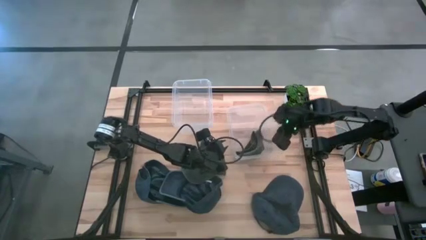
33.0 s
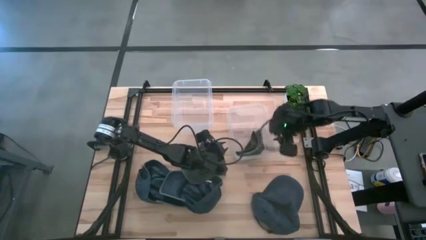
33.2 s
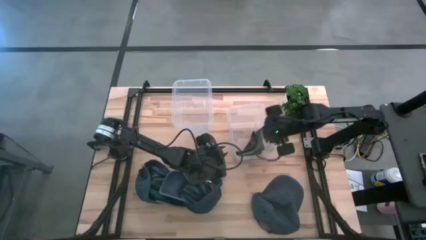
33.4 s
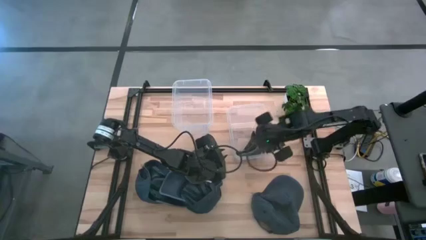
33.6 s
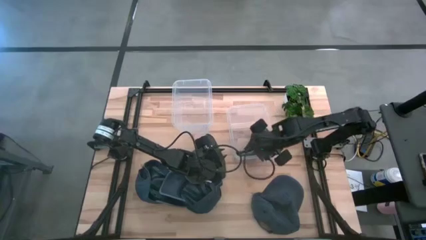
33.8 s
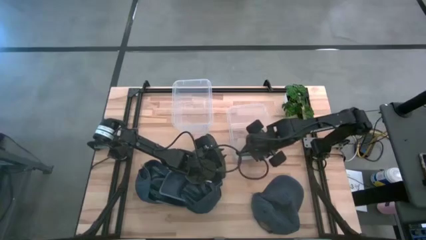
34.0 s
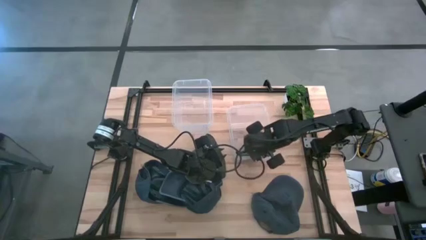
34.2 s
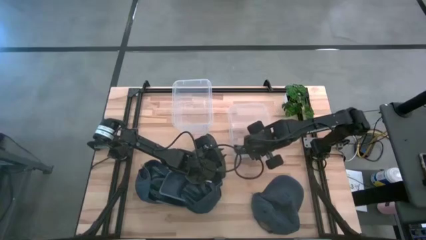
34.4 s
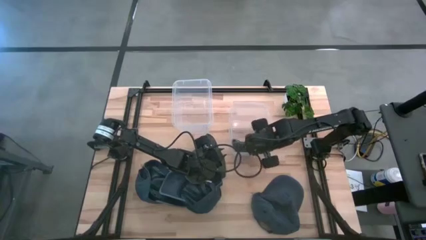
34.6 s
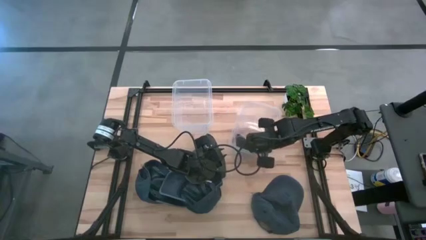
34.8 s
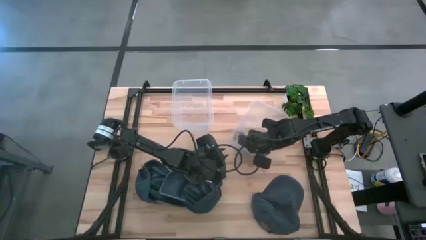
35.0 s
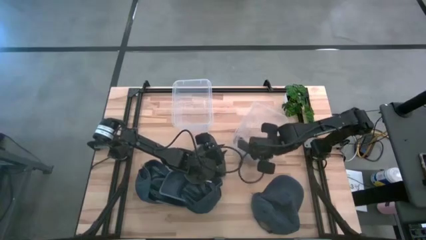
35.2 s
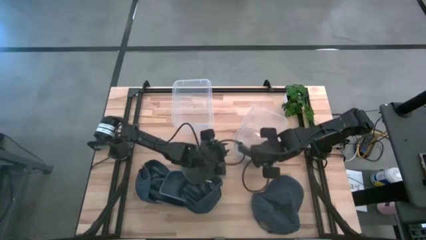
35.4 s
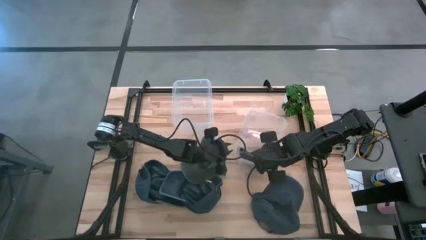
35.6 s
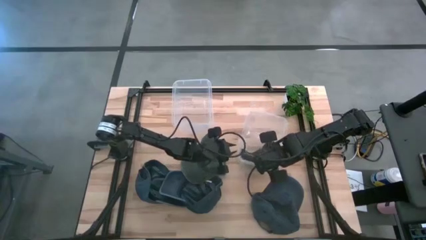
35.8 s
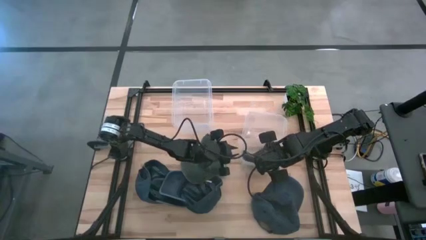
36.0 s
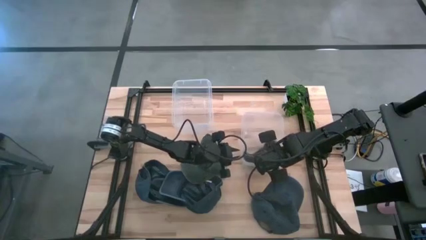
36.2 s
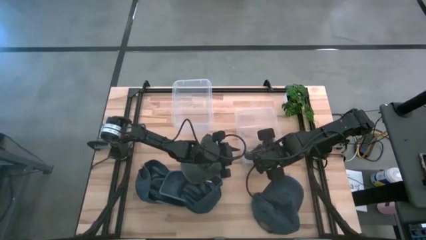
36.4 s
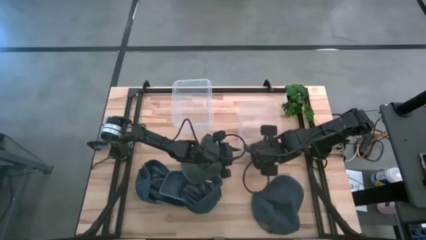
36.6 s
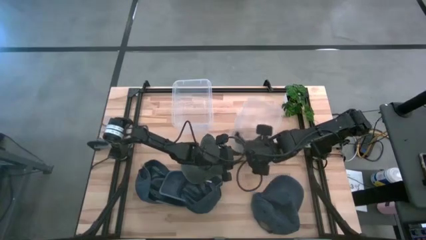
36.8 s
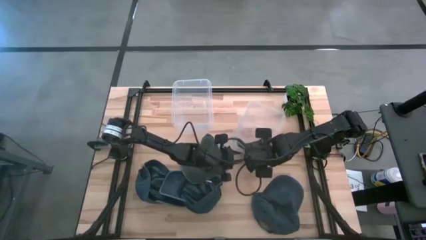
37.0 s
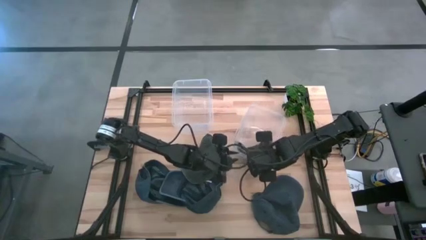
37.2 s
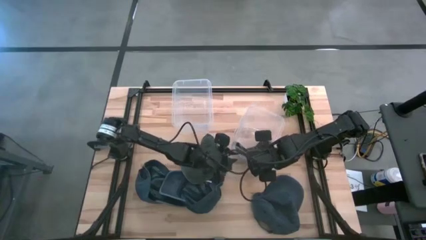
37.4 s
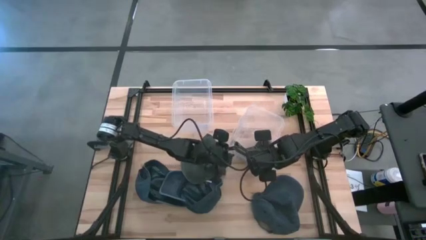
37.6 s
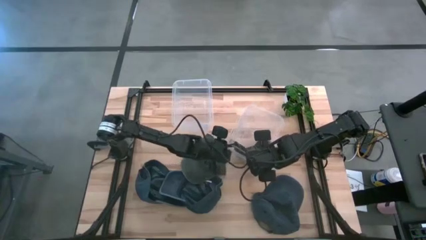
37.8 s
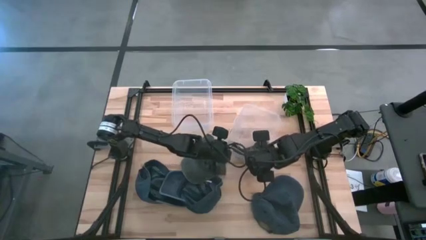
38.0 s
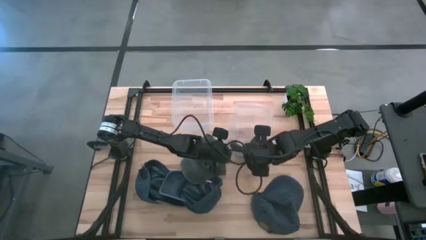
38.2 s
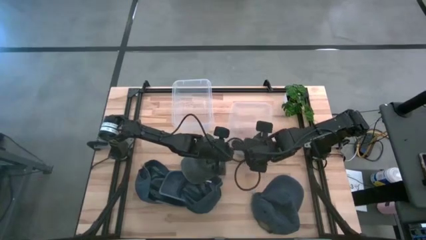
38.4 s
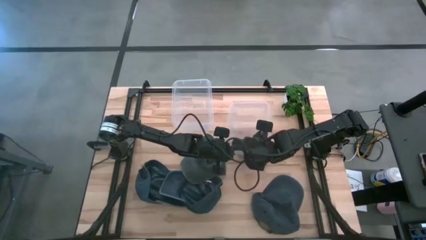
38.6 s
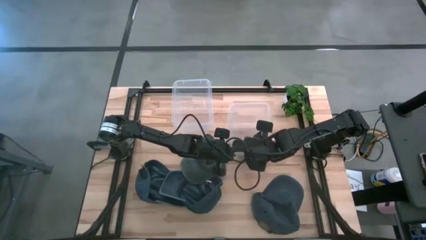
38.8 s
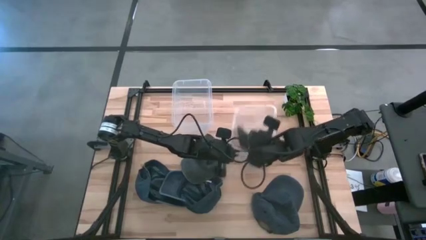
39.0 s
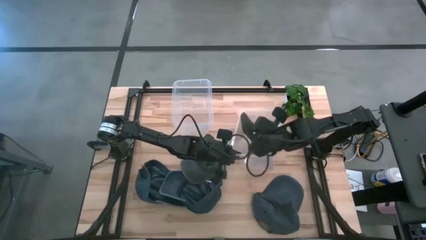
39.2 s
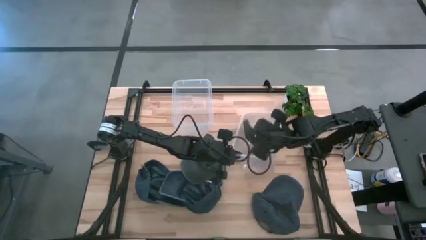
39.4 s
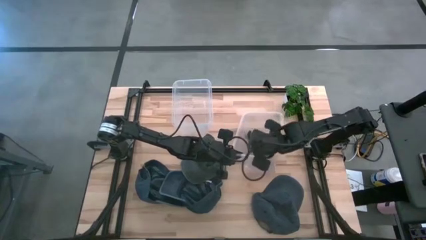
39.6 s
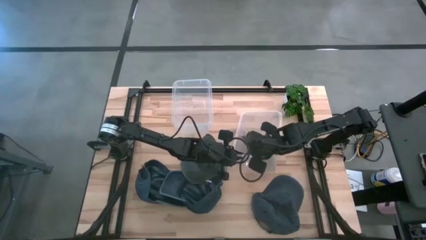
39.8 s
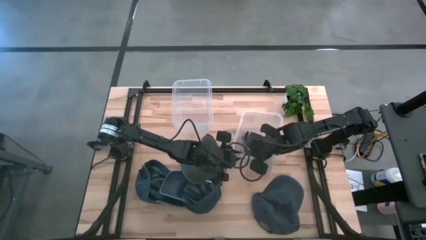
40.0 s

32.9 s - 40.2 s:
Task: Pick & Place hat
Adjust the gray cap in the right bin

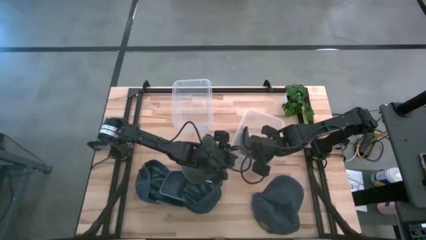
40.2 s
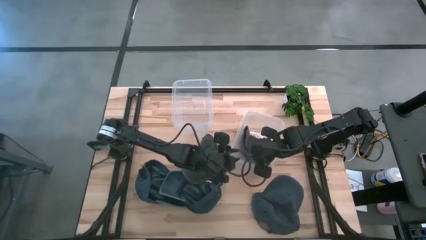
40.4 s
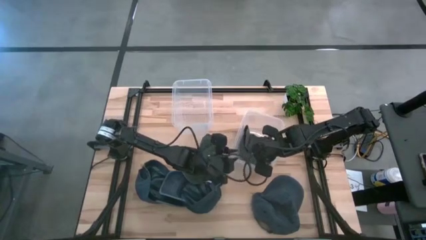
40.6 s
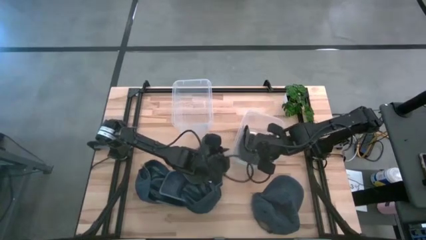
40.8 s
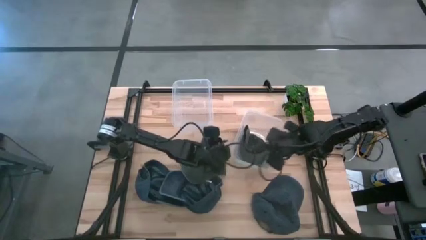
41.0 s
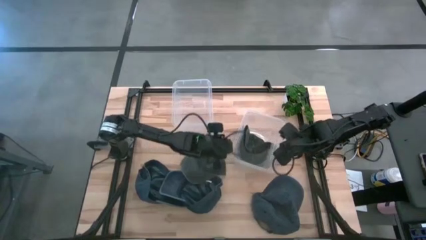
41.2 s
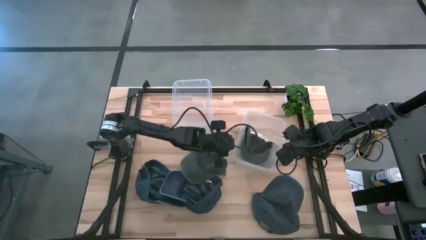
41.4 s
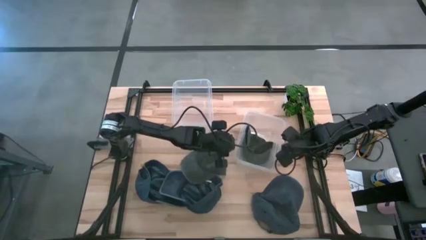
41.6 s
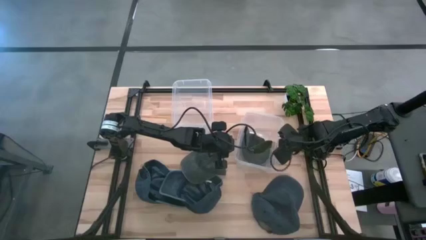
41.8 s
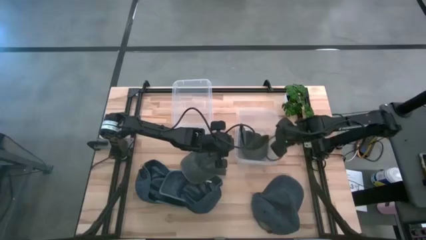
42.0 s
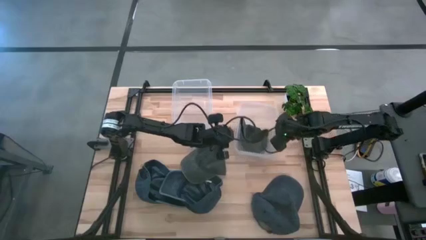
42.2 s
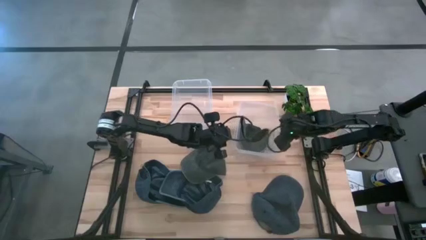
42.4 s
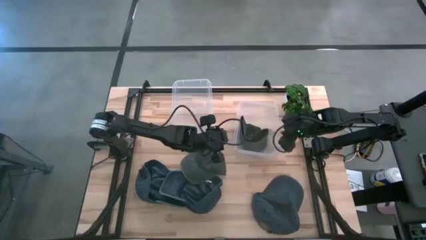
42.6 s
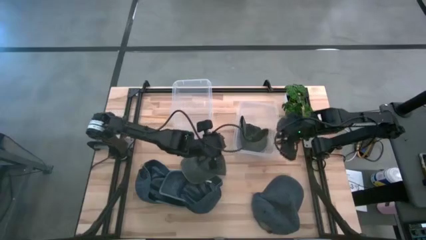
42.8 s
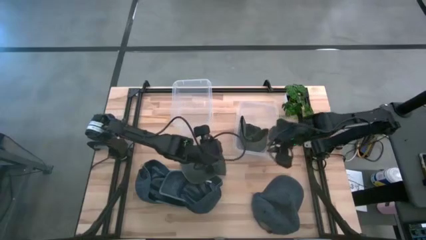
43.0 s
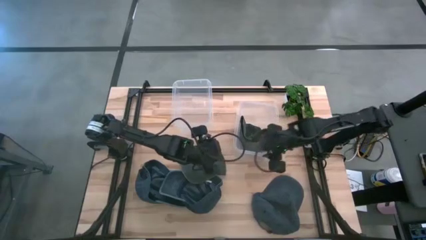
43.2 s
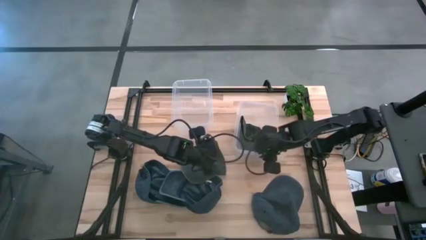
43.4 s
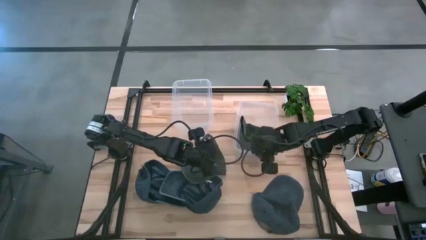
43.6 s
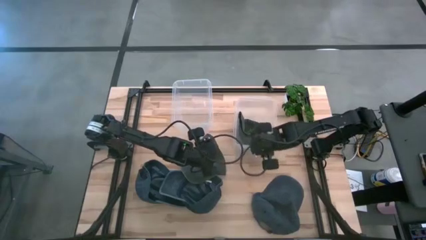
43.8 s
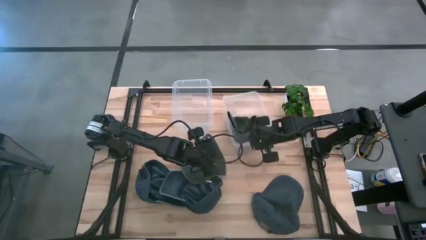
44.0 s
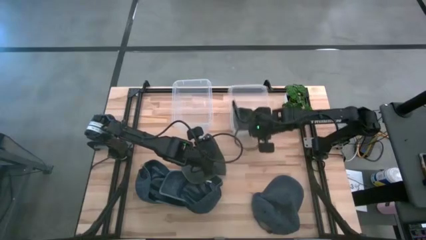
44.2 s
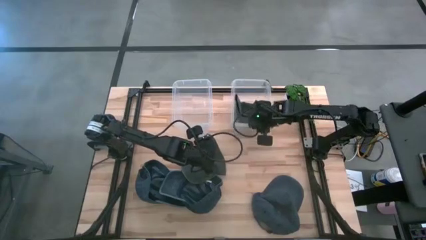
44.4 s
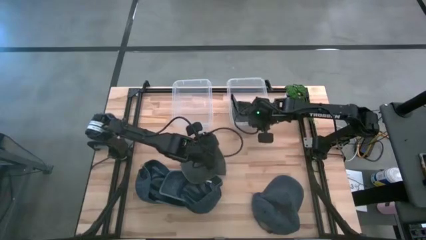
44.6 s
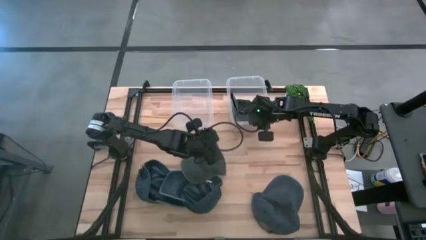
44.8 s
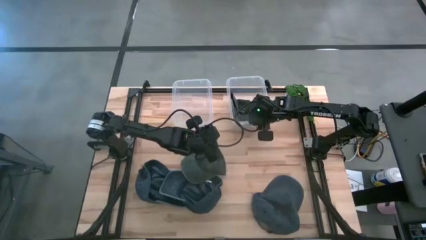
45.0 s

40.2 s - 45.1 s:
Adjust the right bin

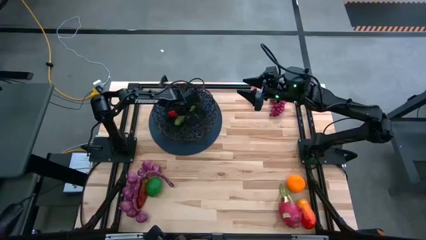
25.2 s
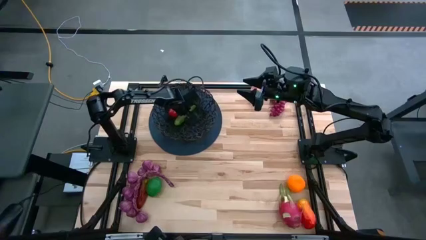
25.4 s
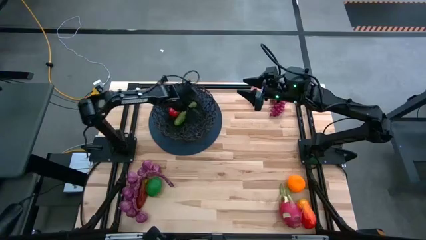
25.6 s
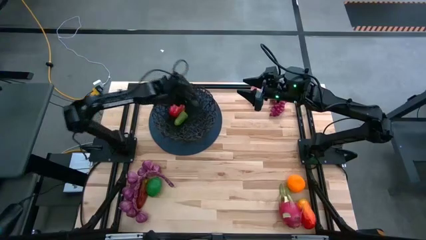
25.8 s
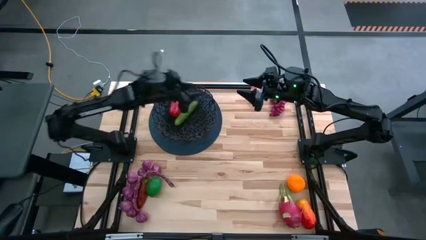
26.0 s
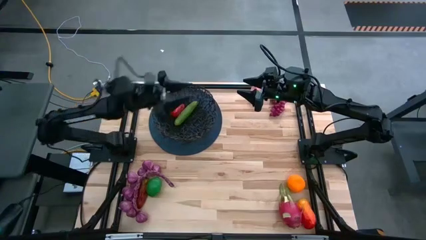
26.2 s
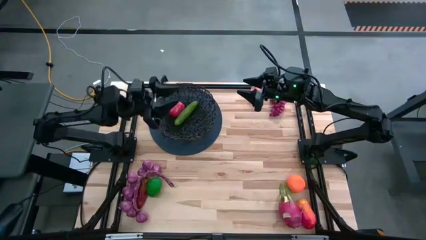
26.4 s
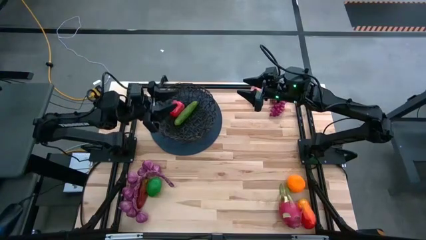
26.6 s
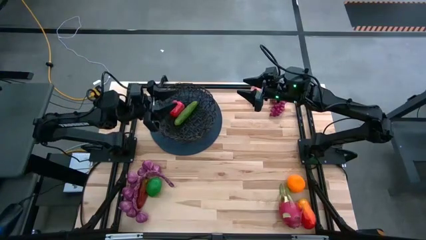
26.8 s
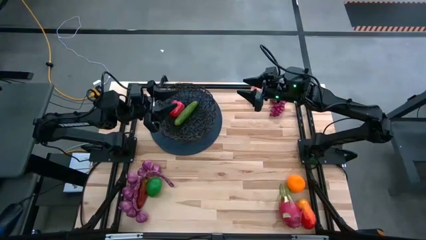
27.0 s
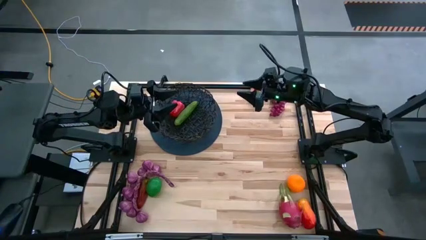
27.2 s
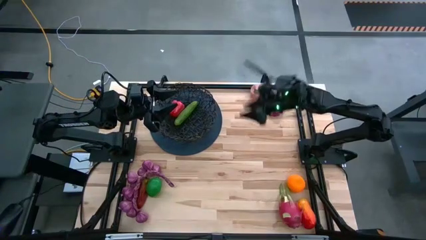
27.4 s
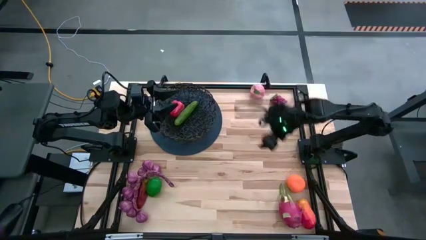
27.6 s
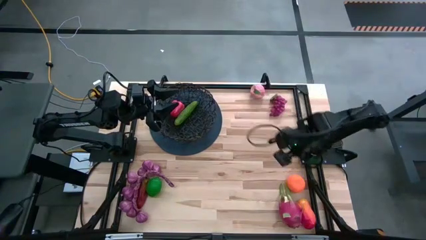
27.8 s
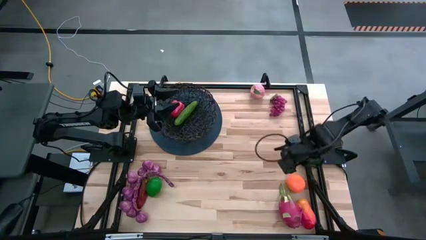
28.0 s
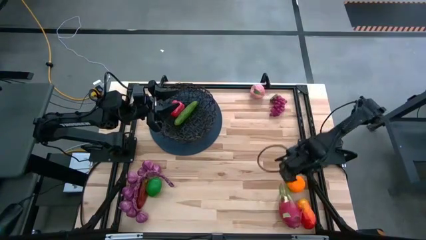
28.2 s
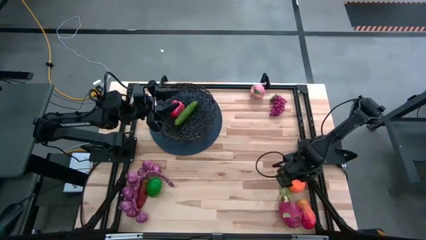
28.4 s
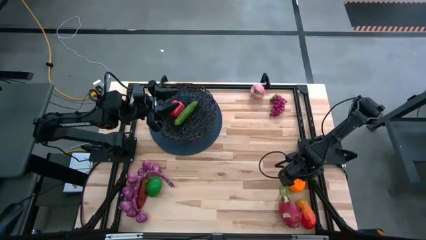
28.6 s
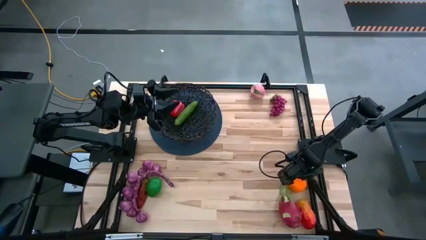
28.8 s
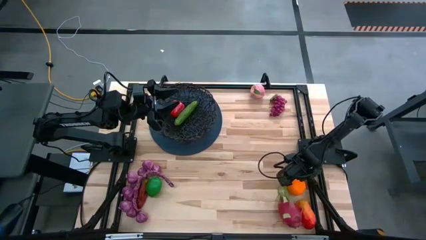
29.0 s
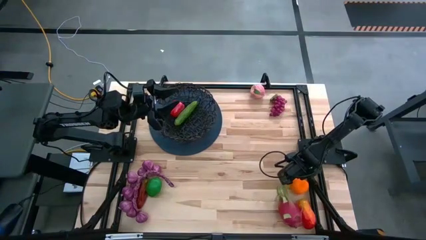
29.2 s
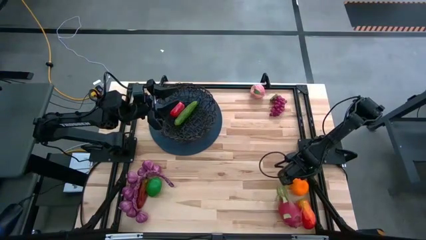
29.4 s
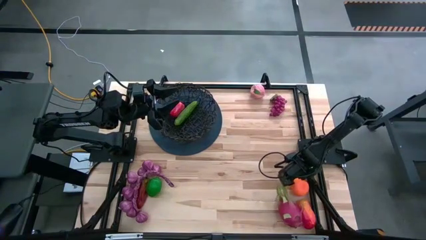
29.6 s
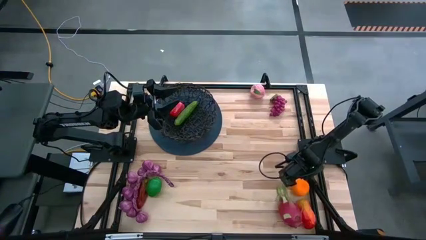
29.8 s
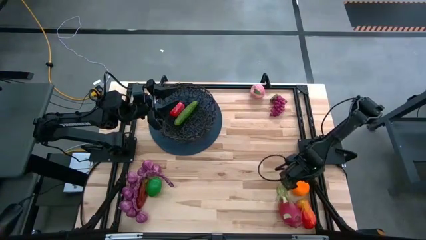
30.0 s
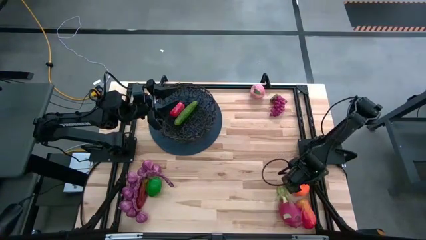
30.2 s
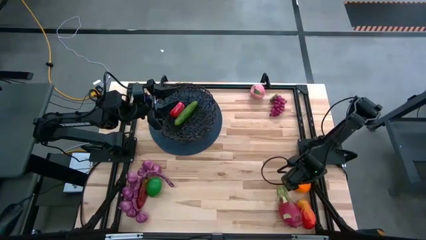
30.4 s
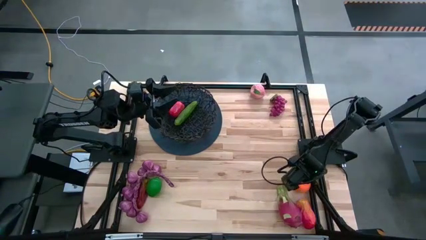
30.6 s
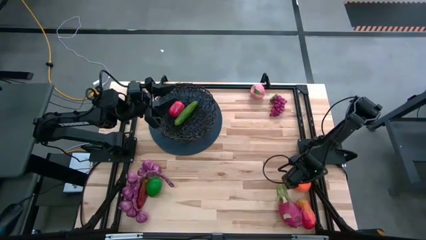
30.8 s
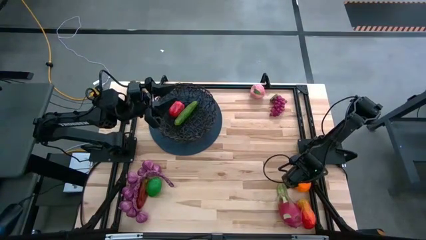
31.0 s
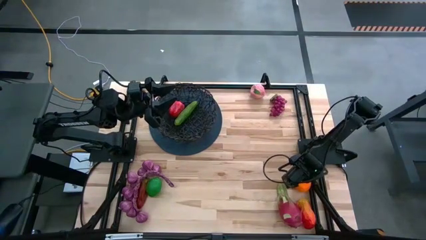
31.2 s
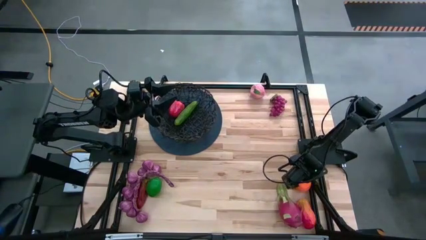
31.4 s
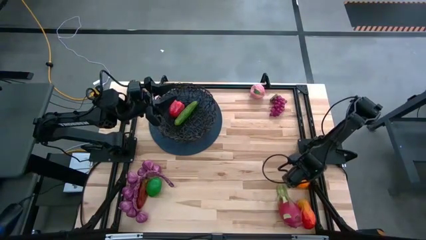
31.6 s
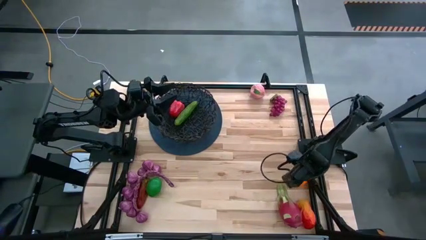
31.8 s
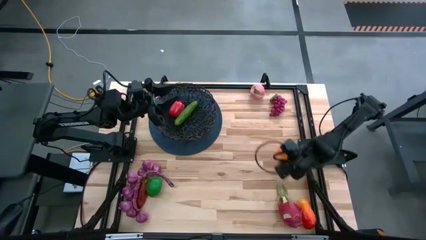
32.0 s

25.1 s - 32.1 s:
Task: Build produce basket
Put the orange into the black wire basket
